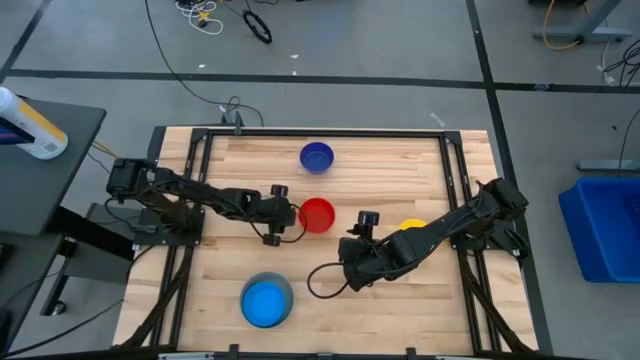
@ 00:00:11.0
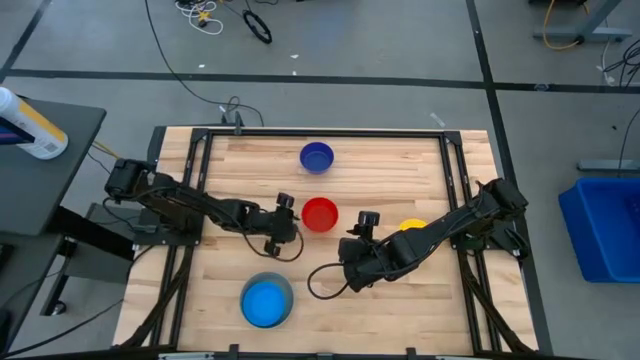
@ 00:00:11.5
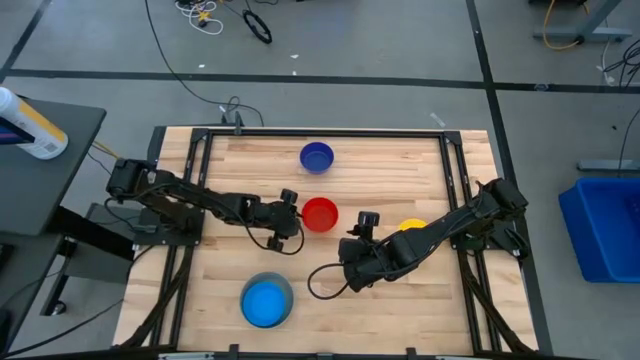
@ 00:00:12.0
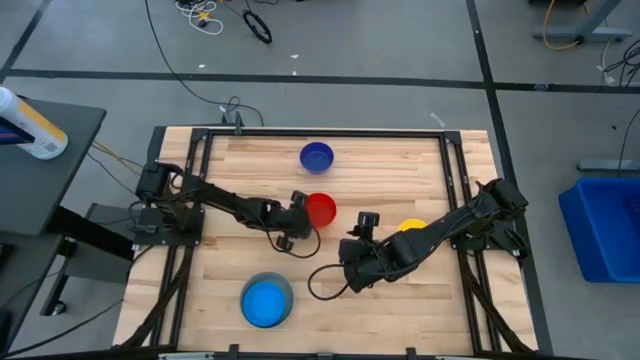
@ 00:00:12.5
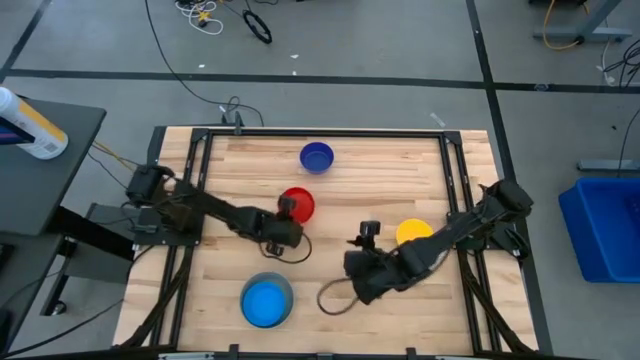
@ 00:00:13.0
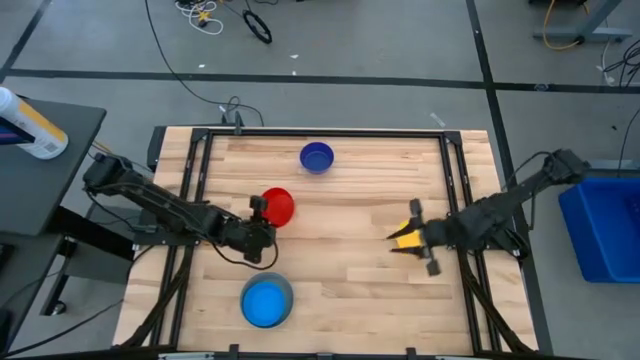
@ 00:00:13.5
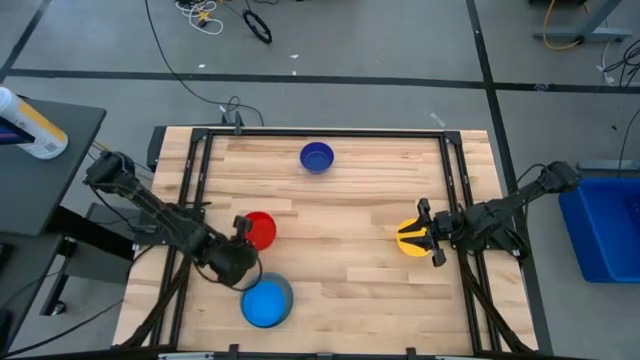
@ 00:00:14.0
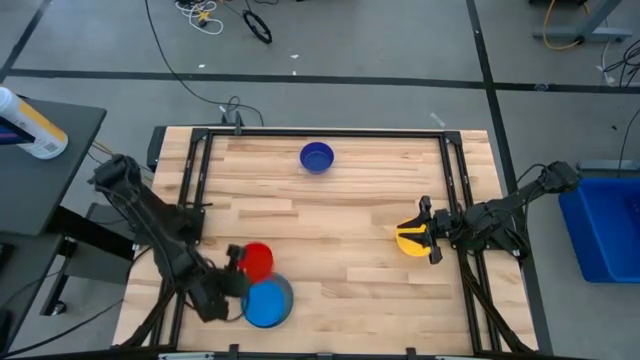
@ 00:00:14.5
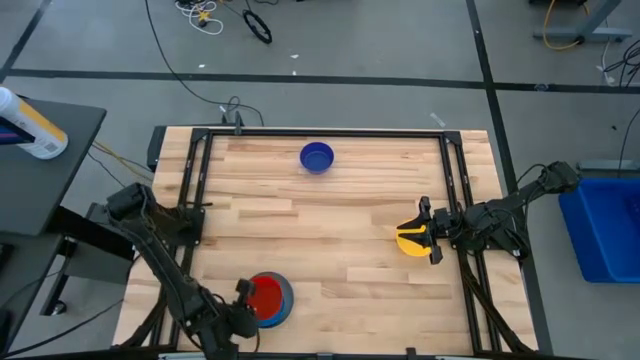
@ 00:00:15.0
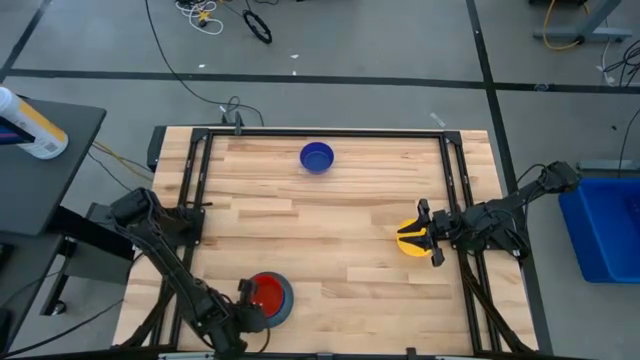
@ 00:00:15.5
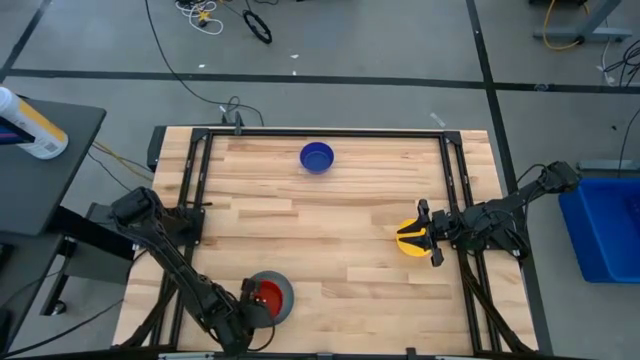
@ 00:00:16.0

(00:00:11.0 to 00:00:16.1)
Stack the red bowl on top of the light blue bowl

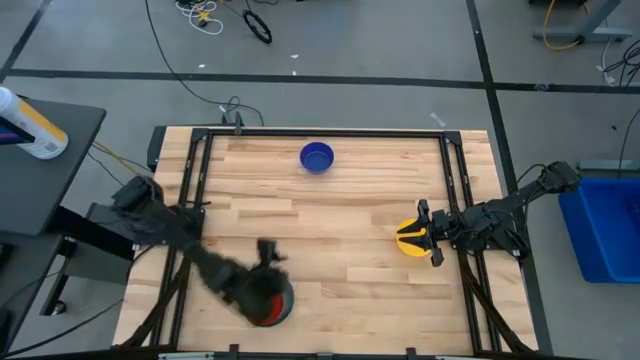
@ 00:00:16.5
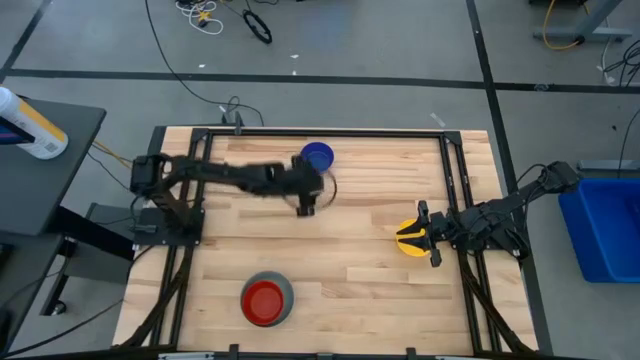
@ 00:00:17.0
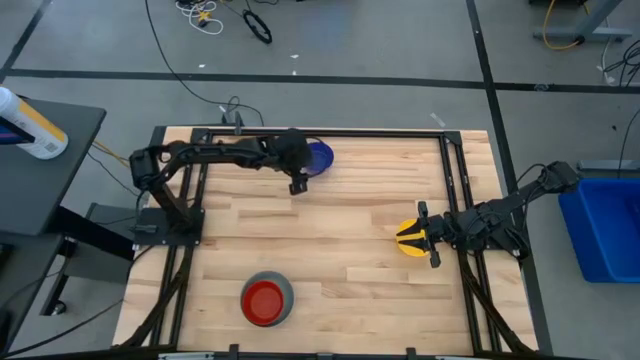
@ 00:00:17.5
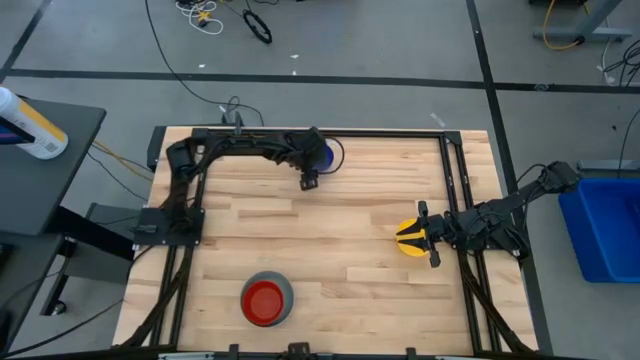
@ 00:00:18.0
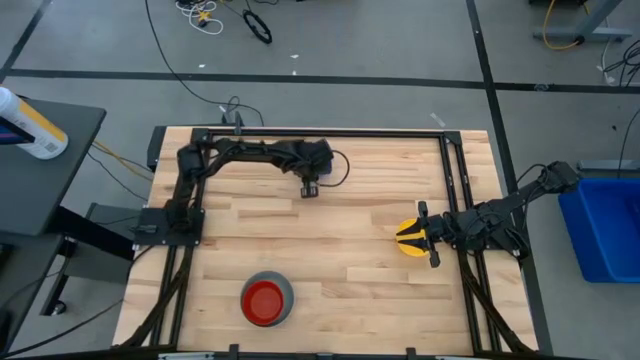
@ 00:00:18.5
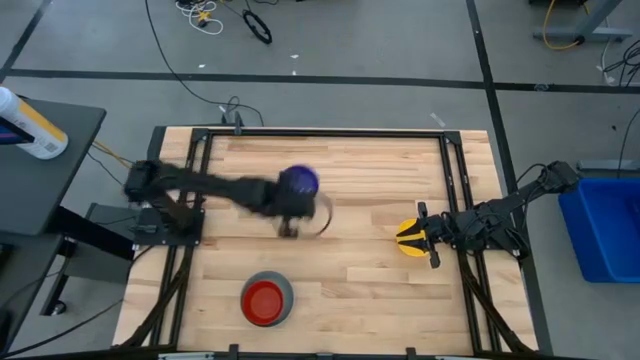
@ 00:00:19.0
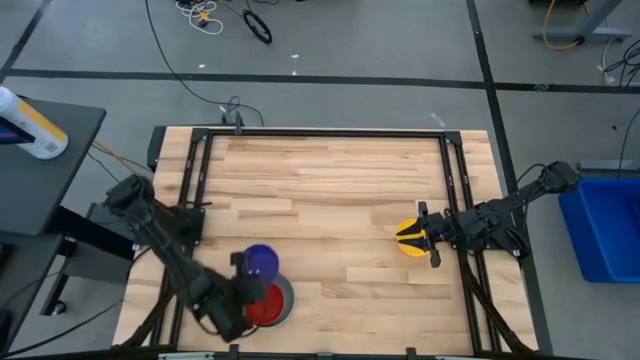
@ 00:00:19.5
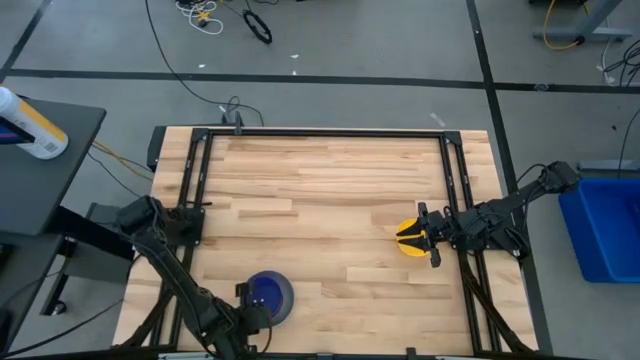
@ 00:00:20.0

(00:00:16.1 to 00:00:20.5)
Stack the blue bowl on top of the red bowl

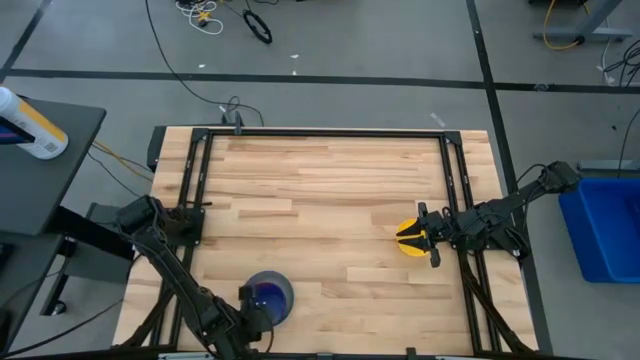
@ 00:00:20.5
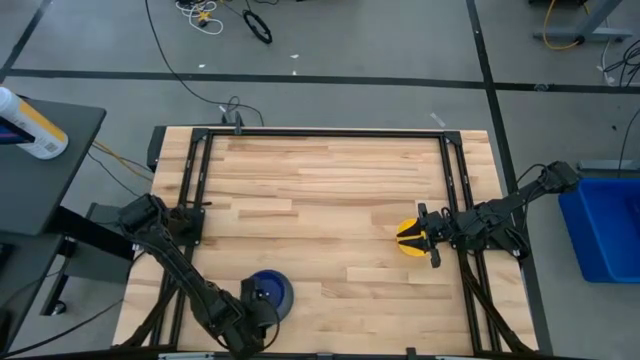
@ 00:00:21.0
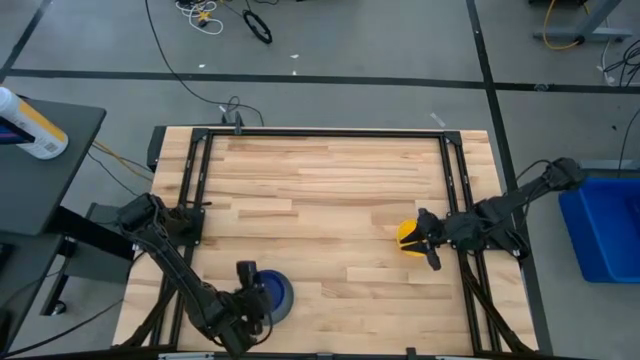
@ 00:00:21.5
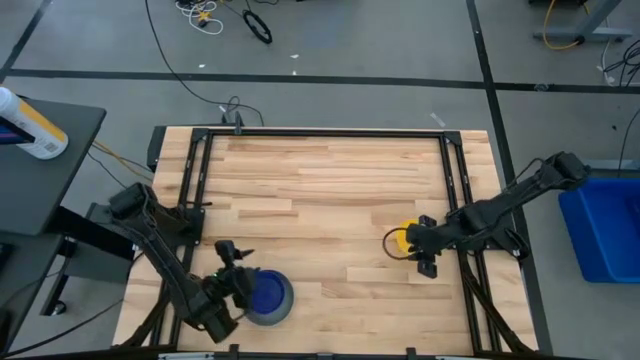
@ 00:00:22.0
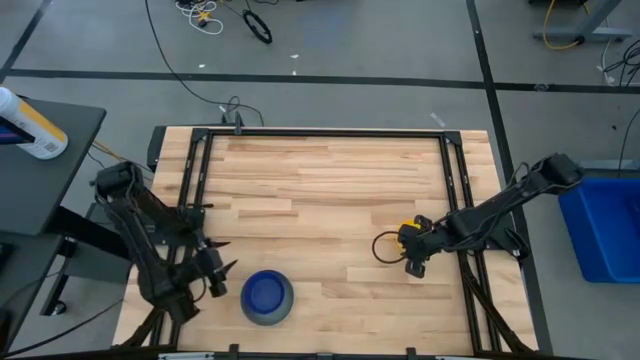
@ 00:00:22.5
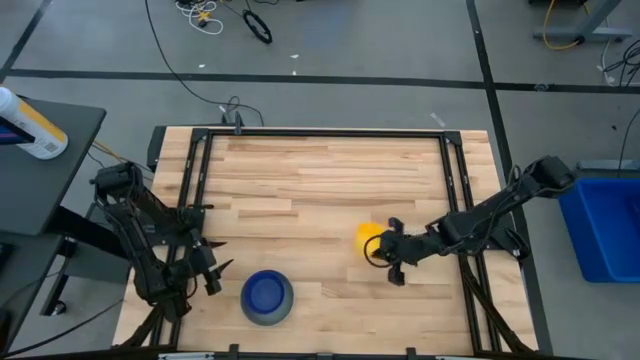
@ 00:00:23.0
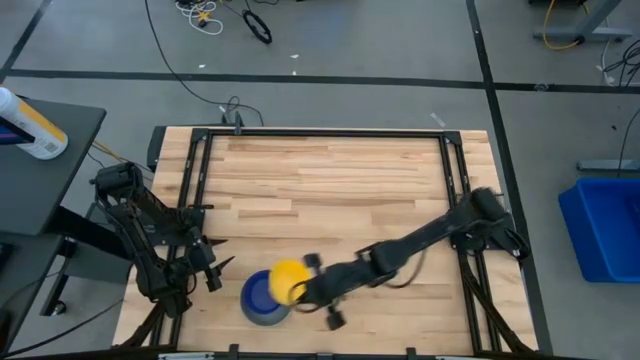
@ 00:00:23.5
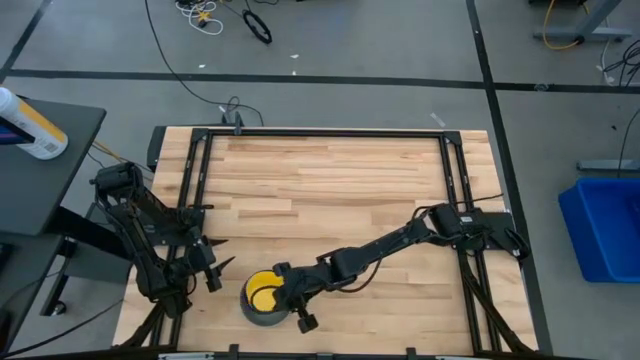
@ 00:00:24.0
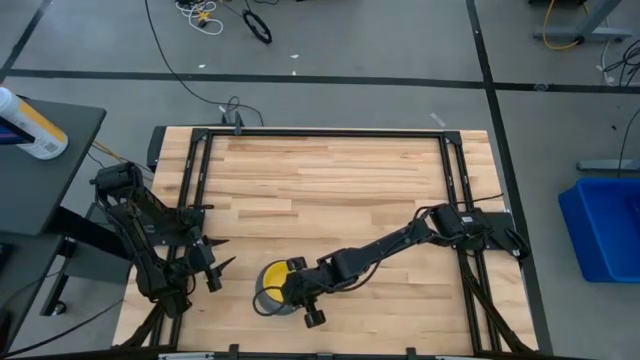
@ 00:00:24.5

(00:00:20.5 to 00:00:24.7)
Stack the yellow bowl on top of the blue bowl

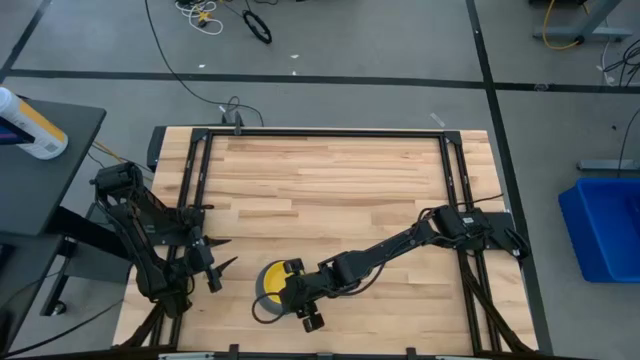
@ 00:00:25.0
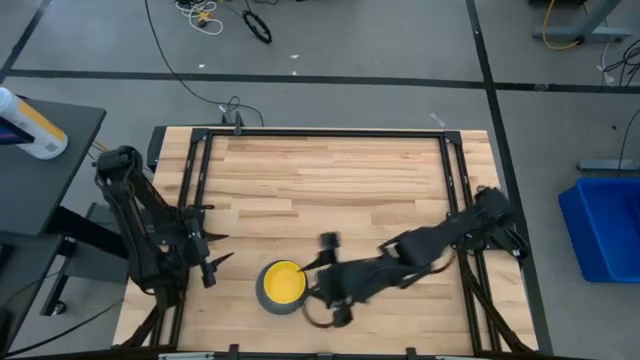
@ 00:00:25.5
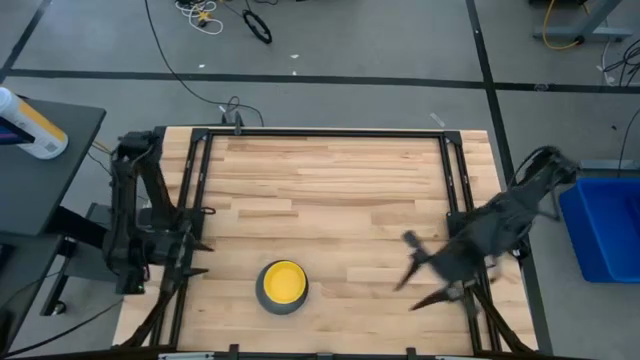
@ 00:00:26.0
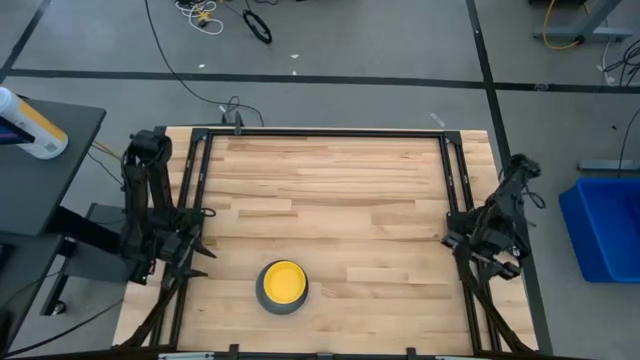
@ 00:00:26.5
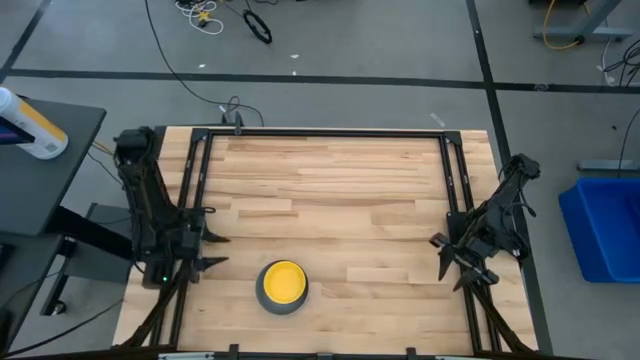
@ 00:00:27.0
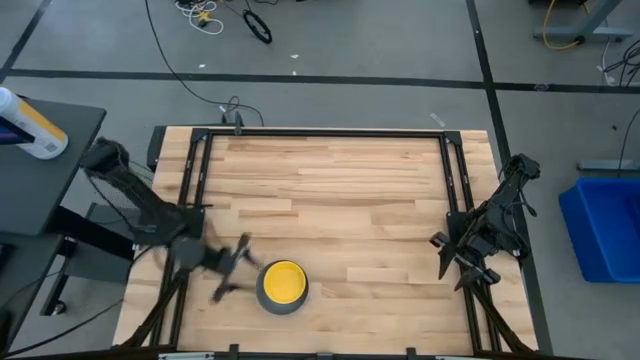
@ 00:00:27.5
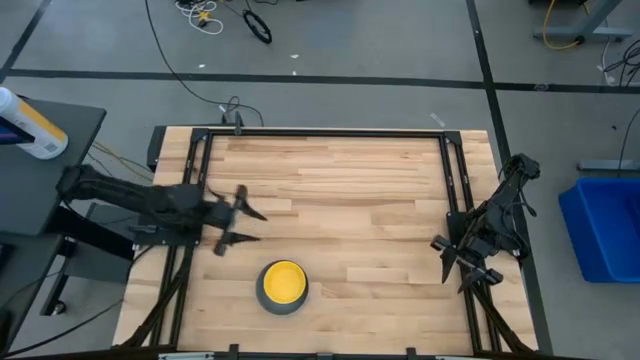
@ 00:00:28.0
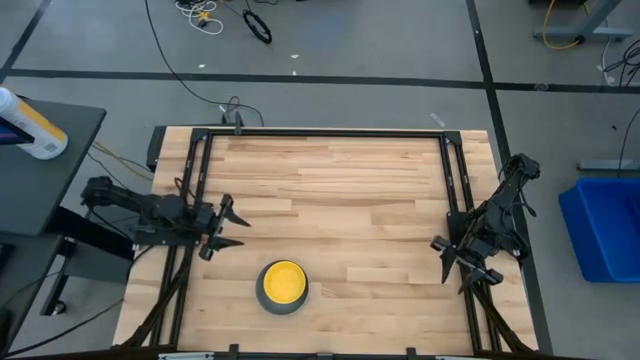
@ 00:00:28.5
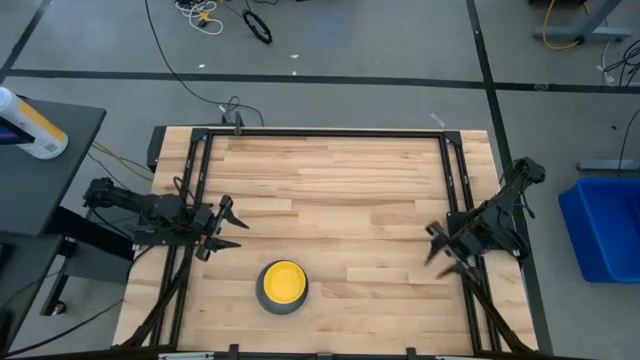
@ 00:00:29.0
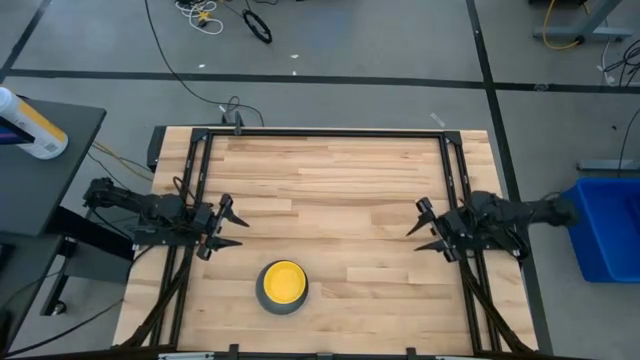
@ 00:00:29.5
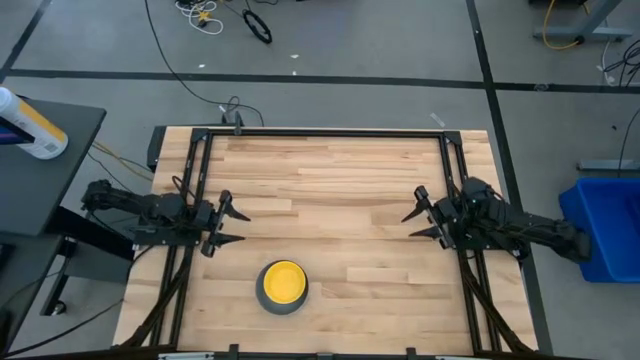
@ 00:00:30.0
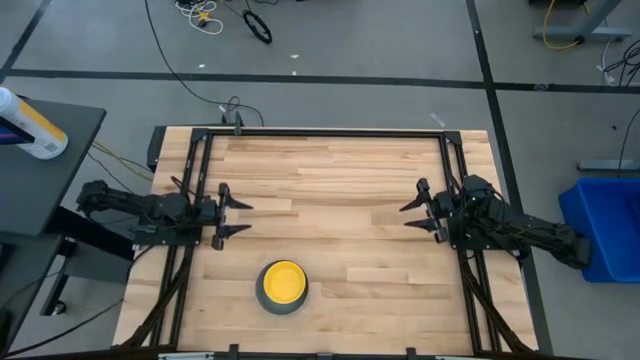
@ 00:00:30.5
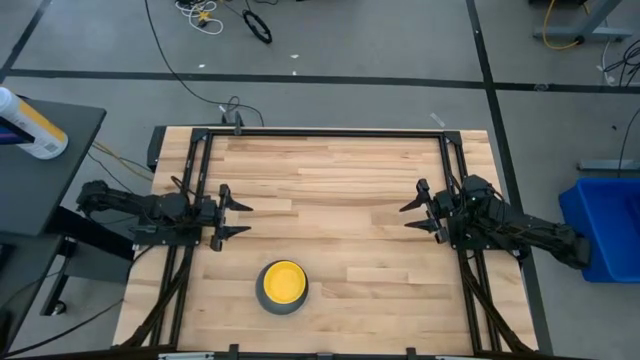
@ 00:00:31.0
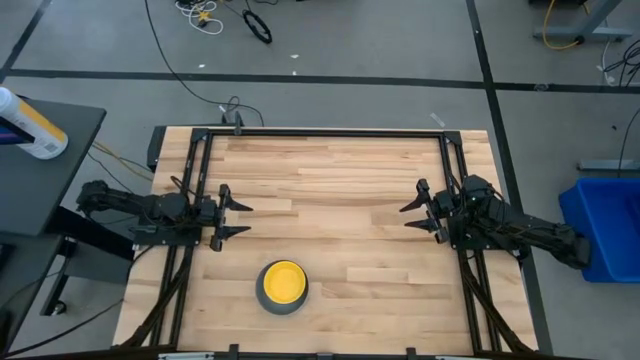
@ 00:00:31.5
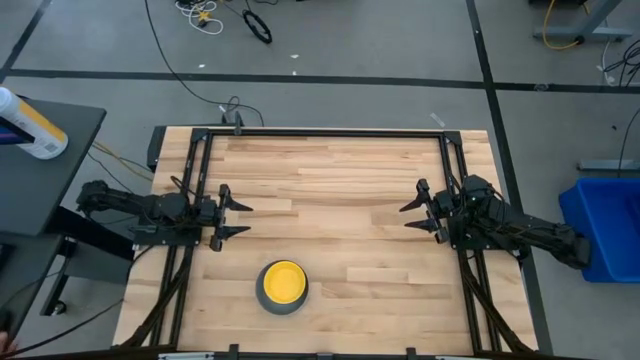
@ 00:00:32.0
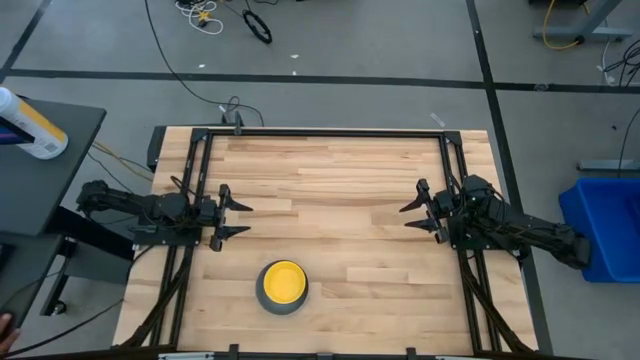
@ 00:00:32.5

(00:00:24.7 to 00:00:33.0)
Return to Home Position
